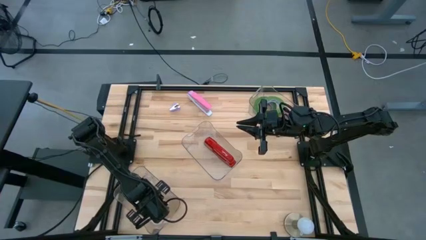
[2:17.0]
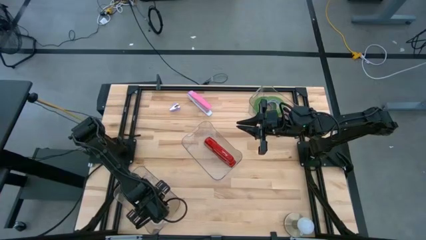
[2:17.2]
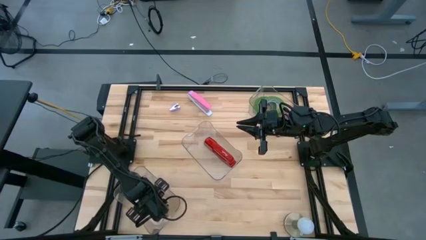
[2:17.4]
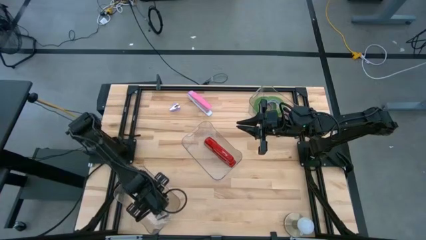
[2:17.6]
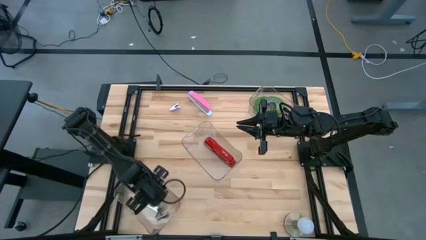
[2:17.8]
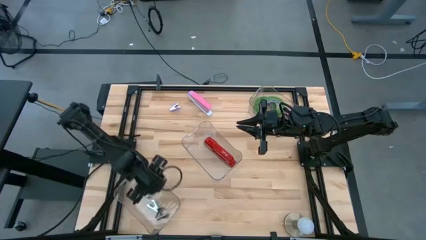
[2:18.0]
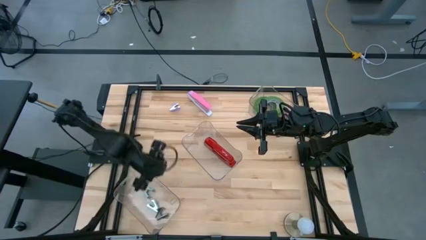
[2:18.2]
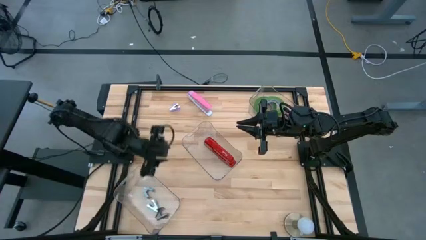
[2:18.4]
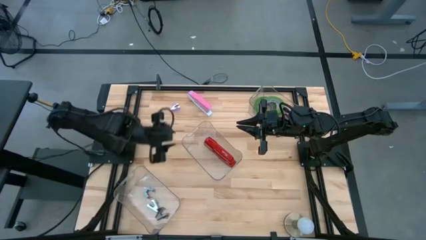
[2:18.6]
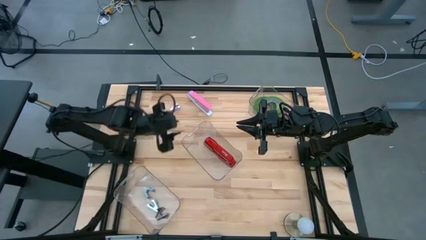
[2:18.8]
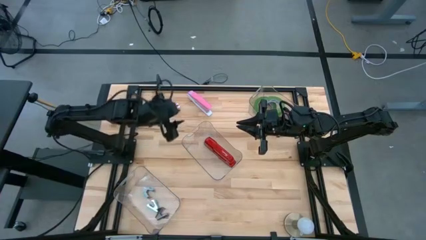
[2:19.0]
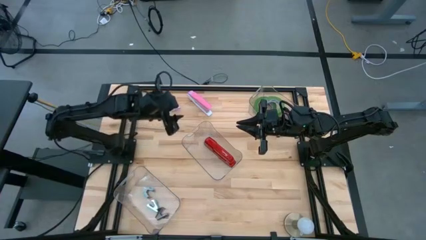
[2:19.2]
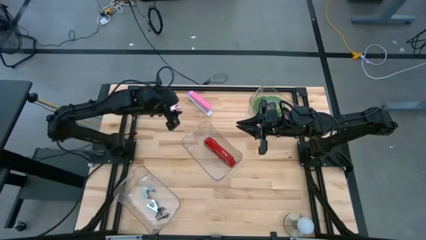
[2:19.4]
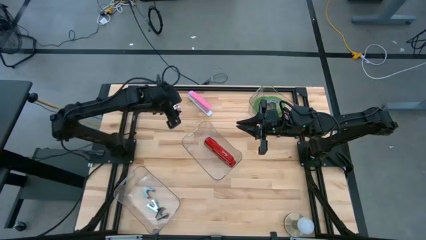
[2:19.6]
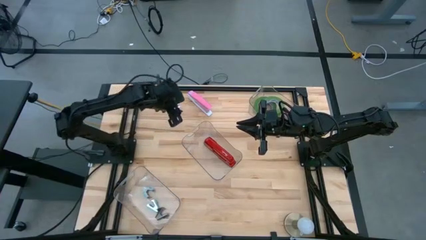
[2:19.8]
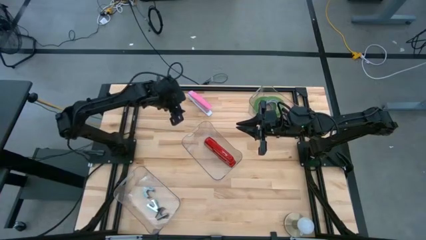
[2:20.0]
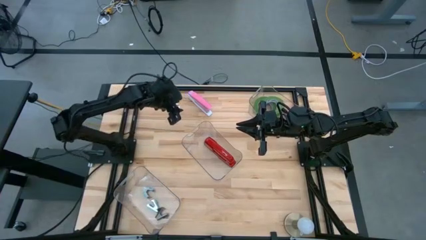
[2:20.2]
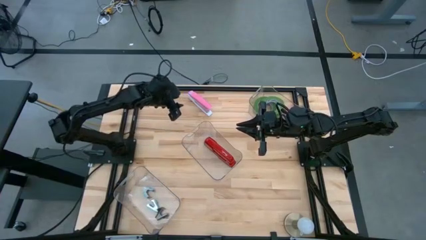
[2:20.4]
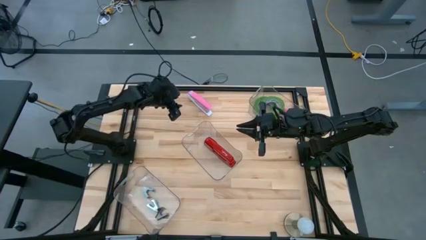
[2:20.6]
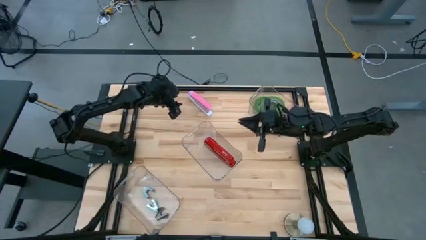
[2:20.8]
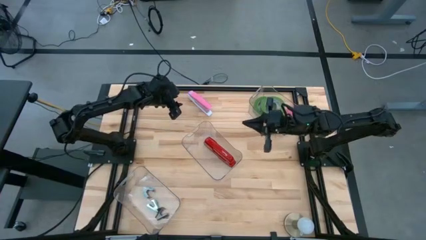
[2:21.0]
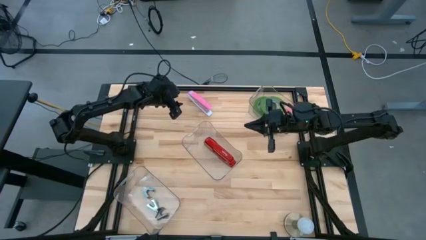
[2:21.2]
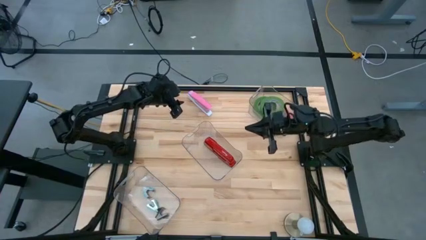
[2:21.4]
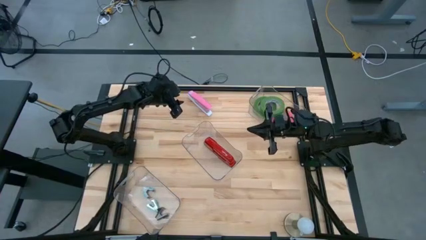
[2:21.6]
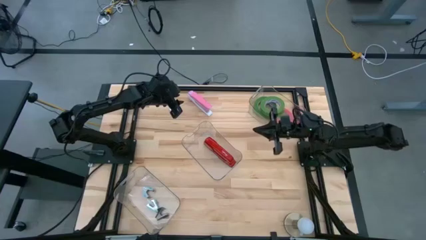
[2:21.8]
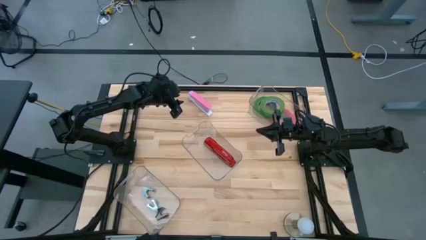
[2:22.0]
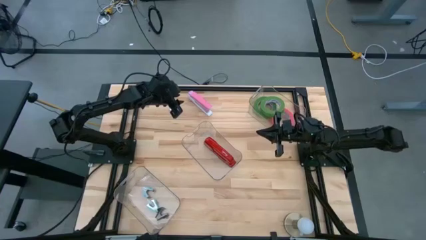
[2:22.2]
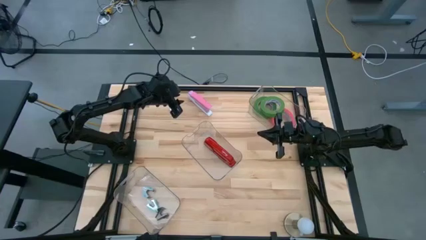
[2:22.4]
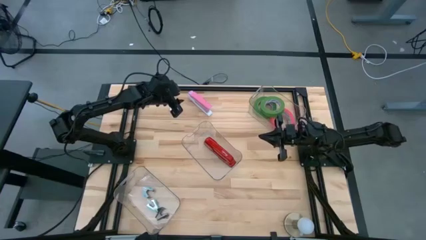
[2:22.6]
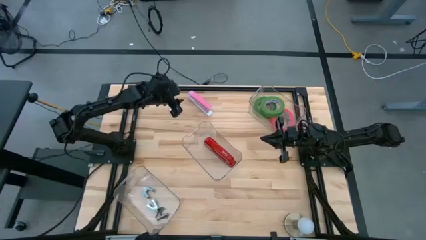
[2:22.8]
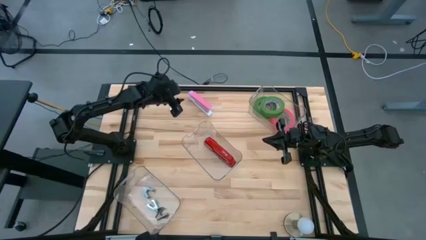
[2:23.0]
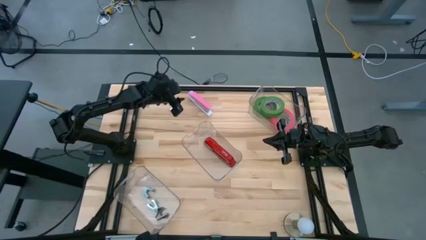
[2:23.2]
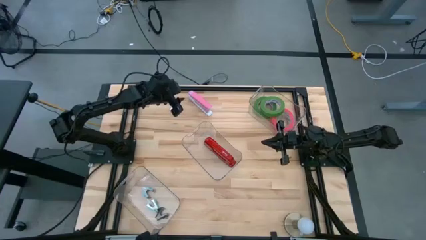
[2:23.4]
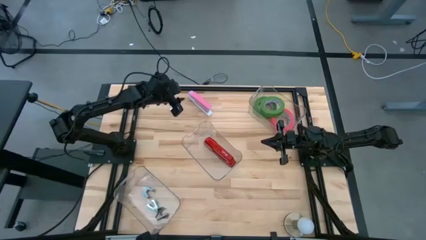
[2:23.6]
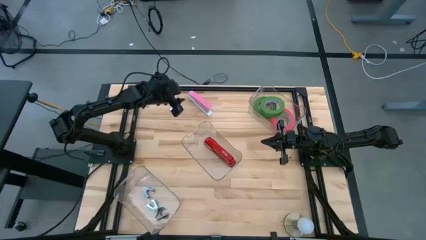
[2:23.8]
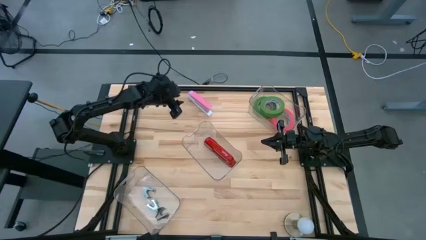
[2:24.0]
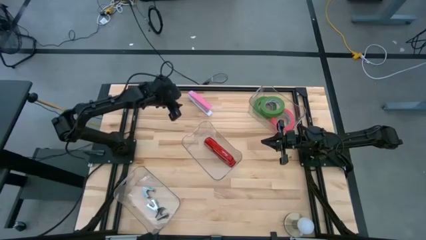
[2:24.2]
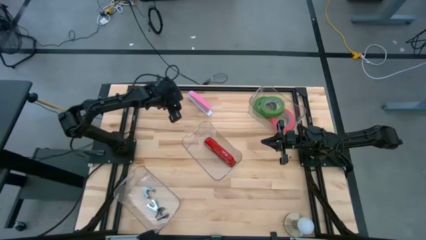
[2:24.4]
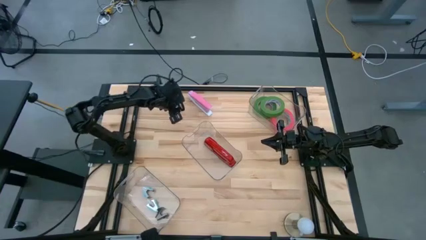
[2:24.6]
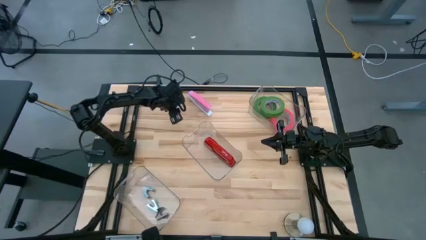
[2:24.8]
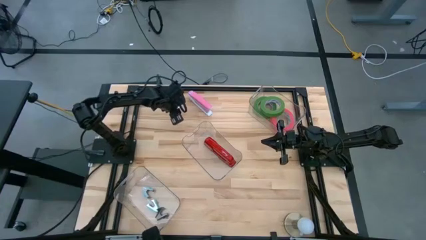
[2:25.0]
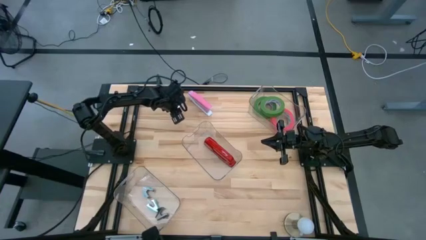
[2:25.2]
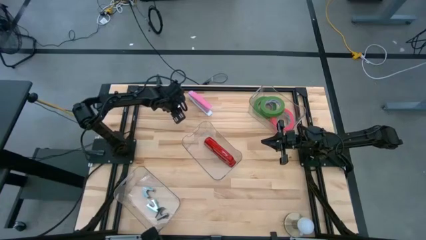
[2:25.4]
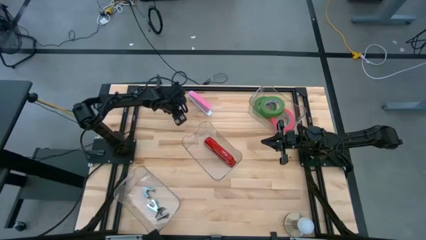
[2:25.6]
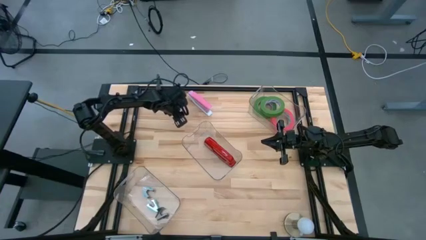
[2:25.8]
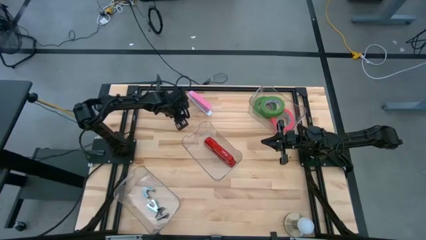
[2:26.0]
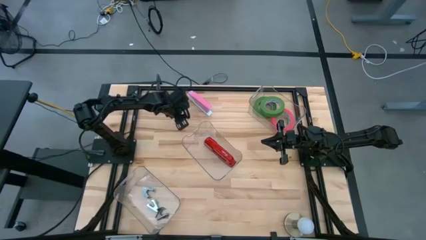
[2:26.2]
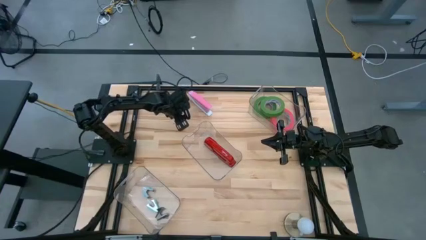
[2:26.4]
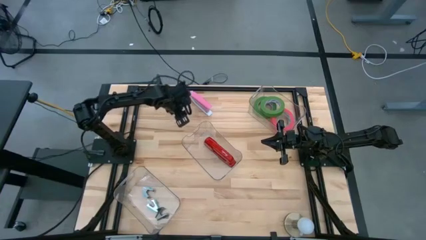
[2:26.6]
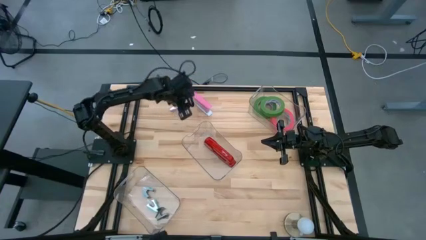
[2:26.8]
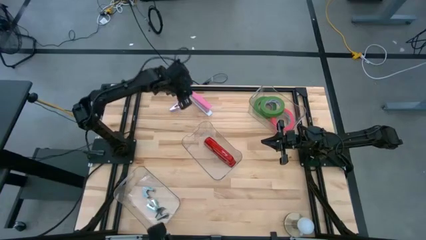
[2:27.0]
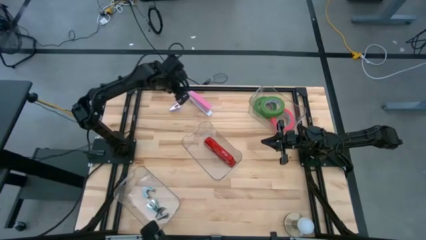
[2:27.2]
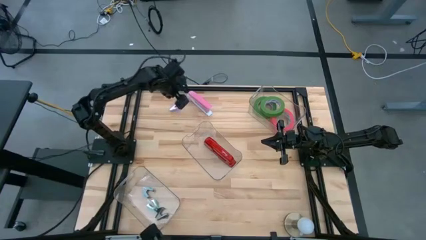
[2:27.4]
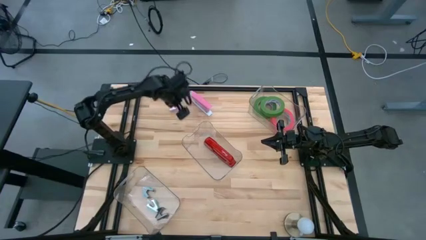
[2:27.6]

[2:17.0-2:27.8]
Task: Pick and place Stapler, Stapler remover, tape
Put the purple stapler remover into the bottom transparent bin

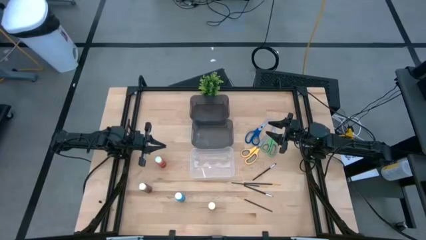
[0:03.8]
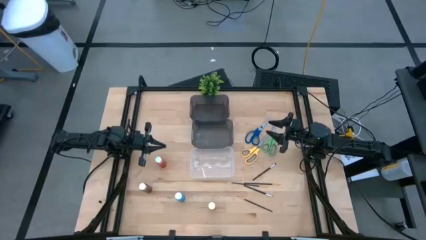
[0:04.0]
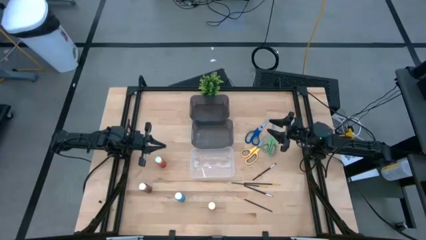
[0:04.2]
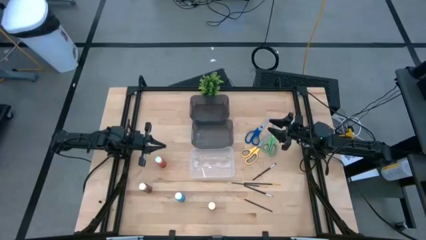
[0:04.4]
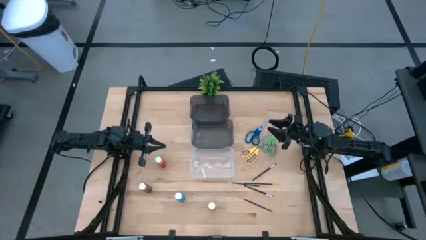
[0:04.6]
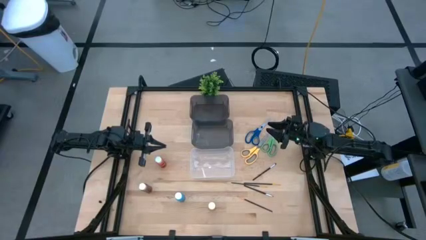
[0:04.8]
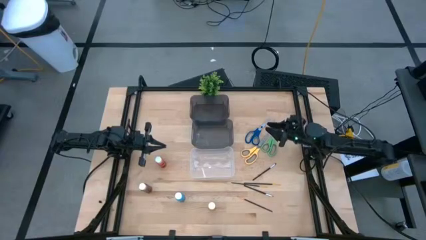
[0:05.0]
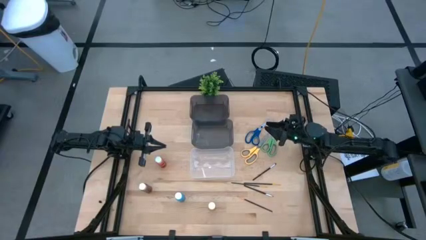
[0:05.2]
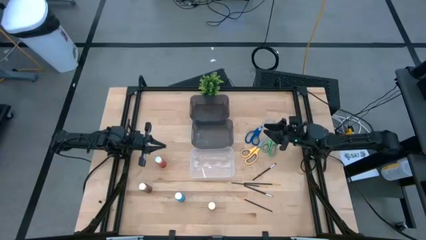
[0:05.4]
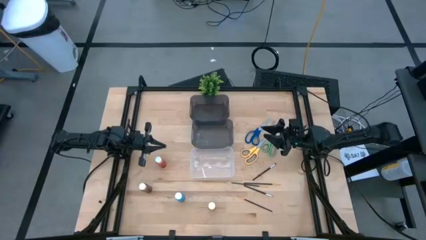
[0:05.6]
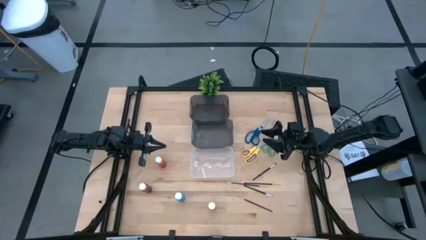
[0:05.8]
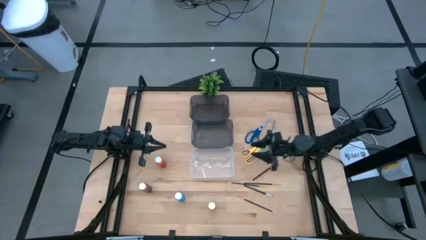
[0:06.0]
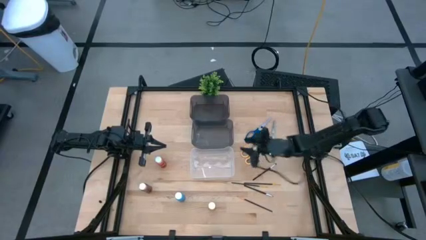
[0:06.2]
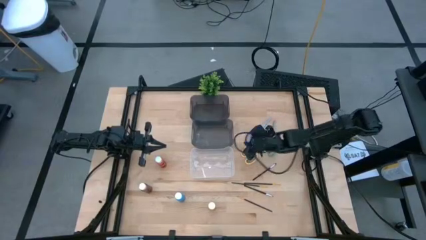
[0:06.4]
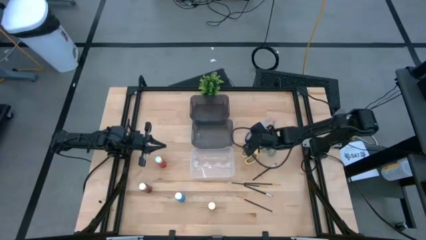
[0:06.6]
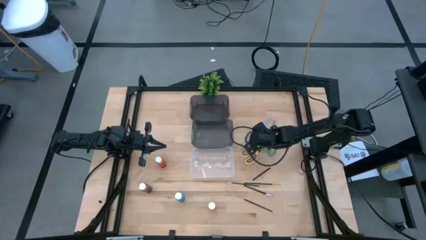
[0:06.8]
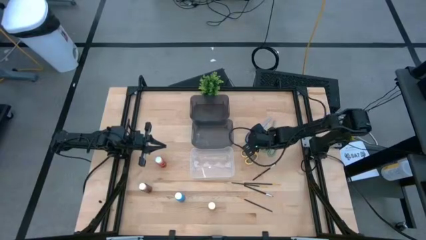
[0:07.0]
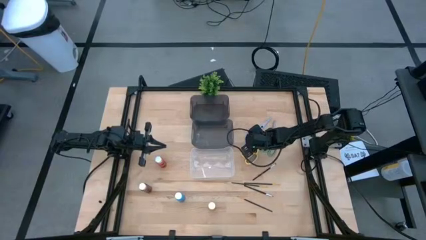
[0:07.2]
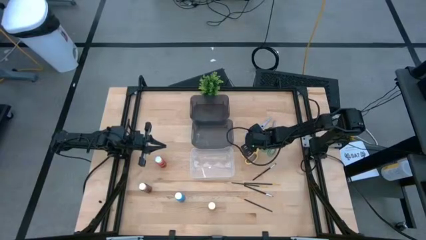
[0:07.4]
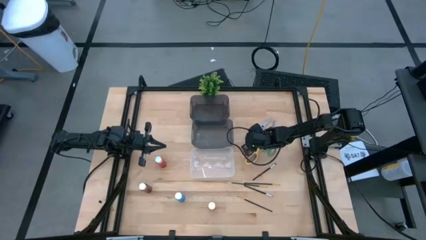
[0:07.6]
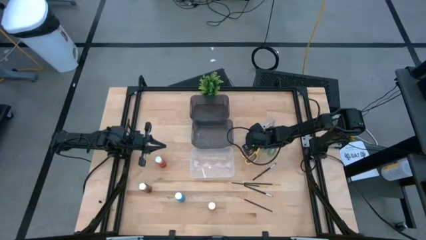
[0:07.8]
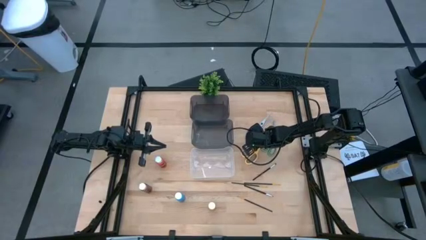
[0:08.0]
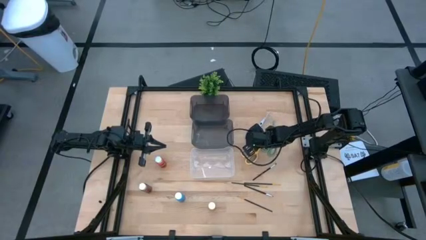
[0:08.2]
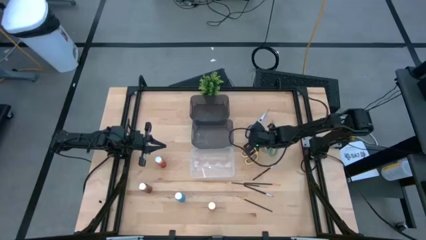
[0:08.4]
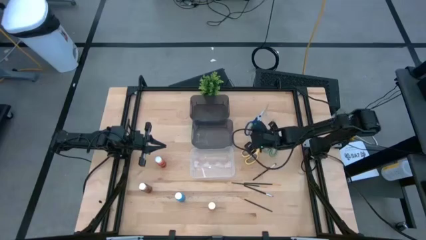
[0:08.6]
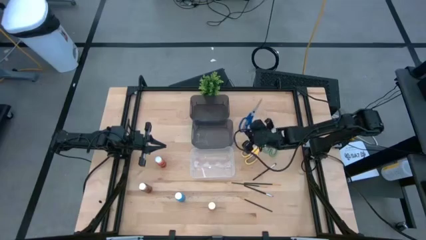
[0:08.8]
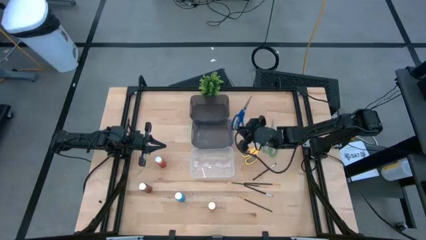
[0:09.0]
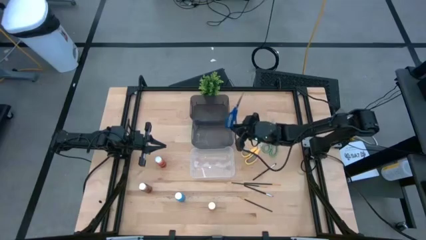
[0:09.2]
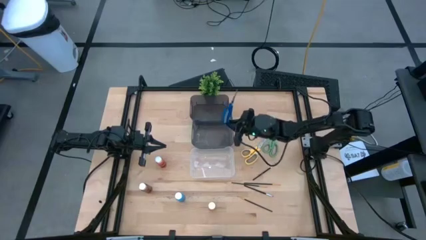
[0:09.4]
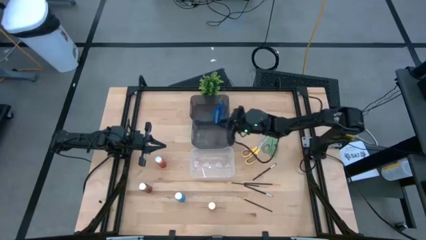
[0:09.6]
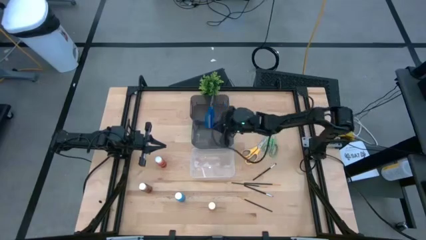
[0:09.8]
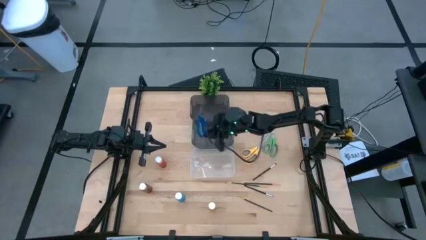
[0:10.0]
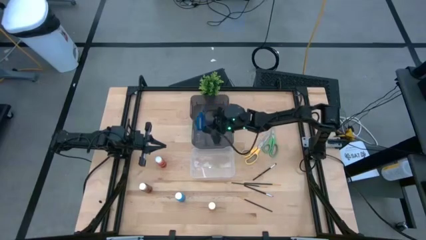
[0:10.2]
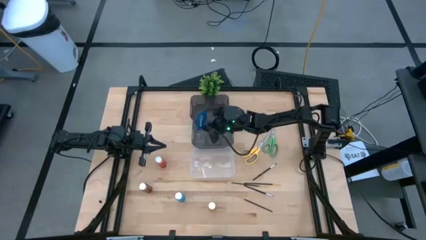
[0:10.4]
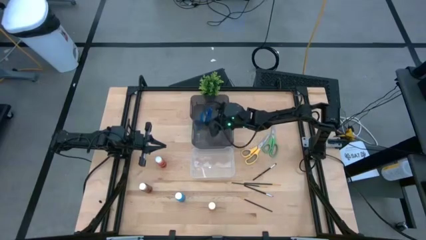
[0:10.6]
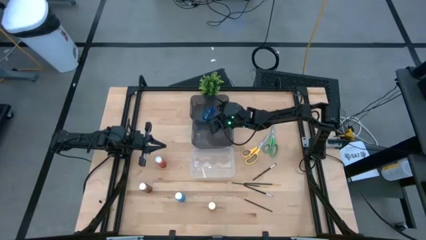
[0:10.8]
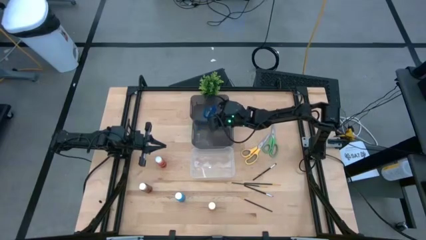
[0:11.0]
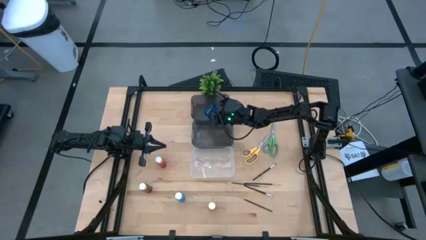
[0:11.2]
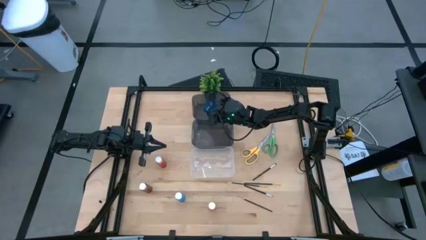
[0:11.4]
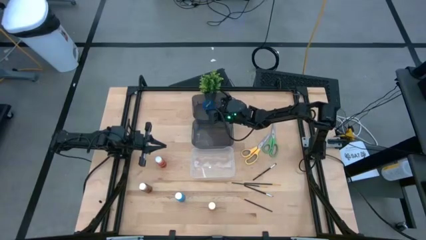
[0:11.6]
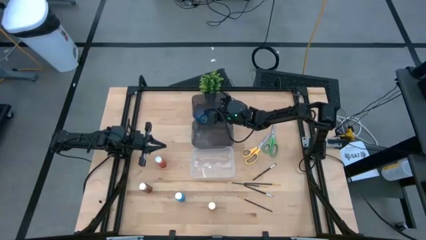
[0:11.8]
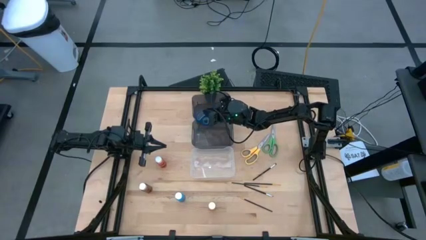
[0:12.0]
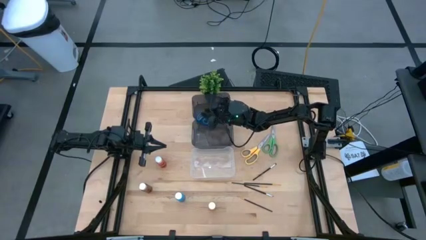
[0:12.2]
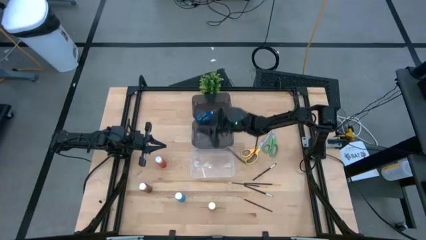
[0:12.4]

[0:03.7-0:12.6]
Task: Pick & Place Paint Supplies
Put the blue scissors into the top black bin
